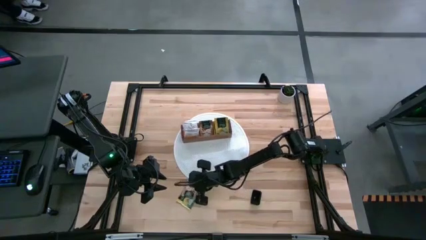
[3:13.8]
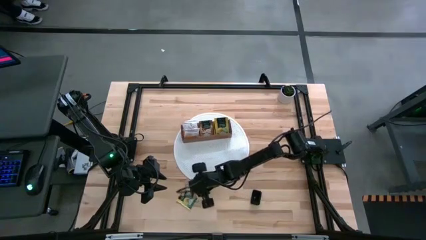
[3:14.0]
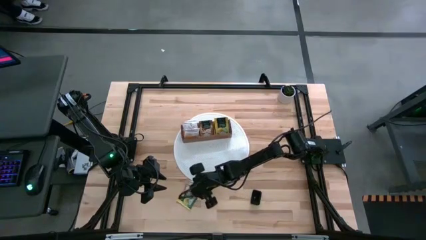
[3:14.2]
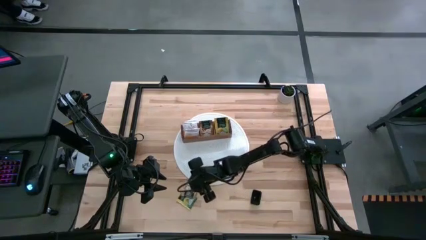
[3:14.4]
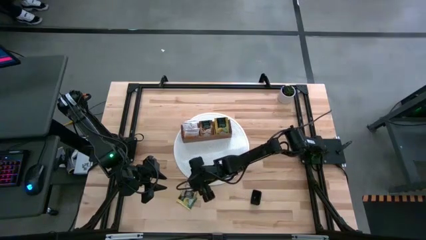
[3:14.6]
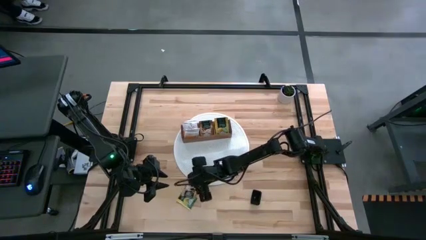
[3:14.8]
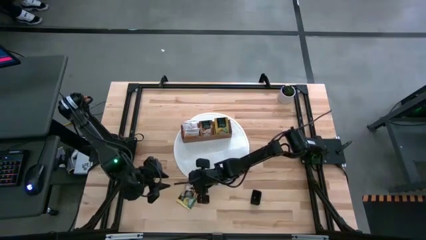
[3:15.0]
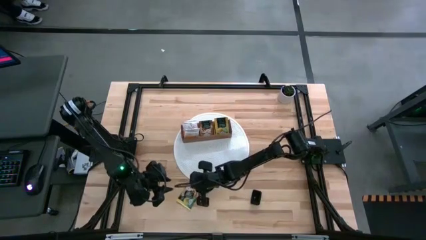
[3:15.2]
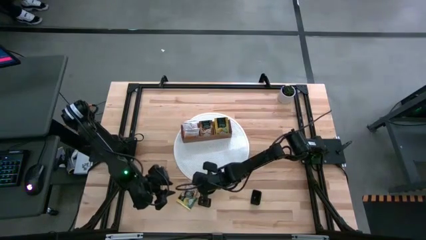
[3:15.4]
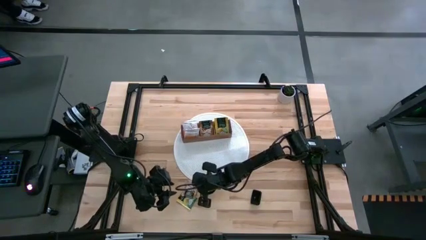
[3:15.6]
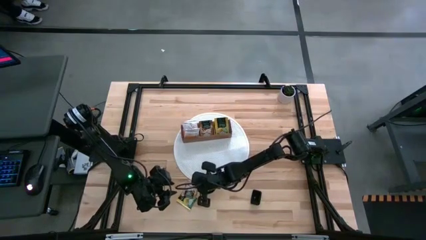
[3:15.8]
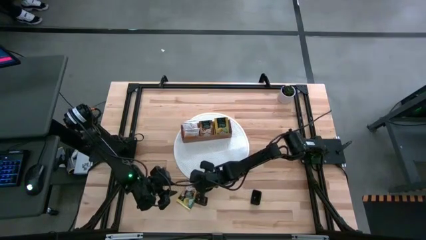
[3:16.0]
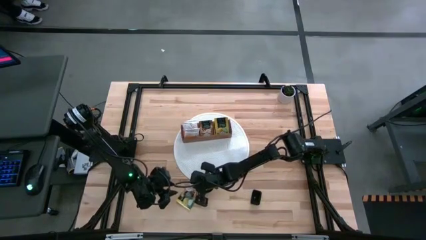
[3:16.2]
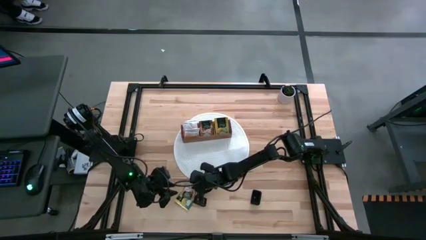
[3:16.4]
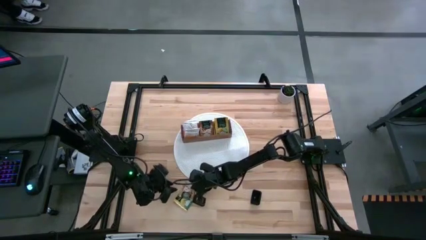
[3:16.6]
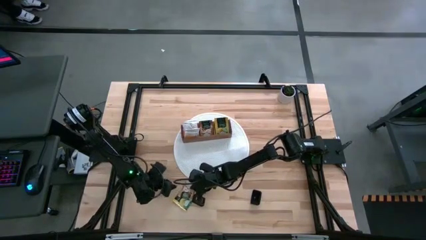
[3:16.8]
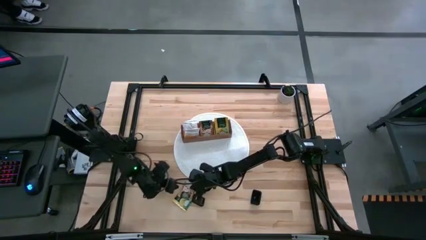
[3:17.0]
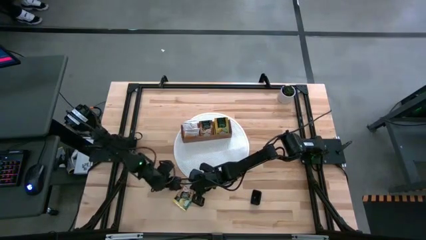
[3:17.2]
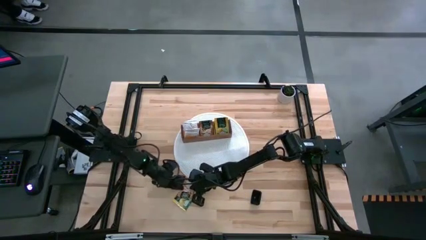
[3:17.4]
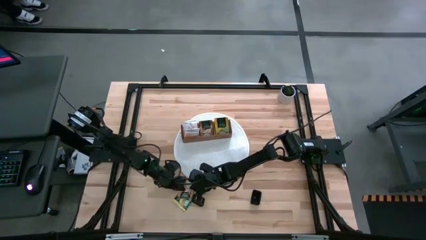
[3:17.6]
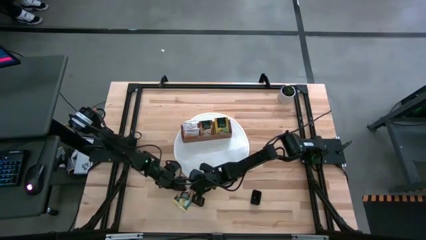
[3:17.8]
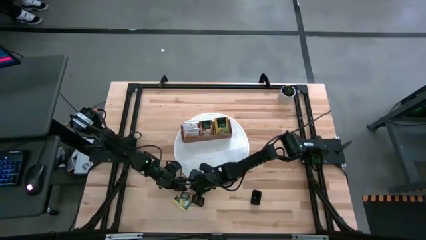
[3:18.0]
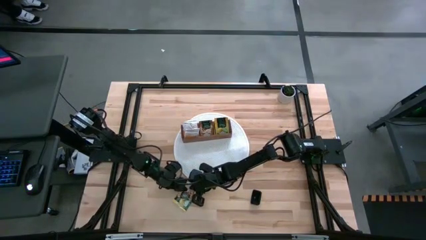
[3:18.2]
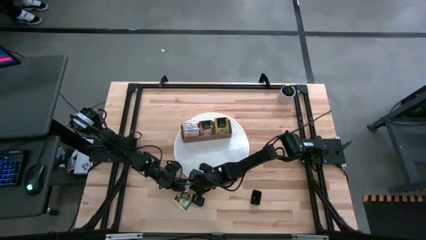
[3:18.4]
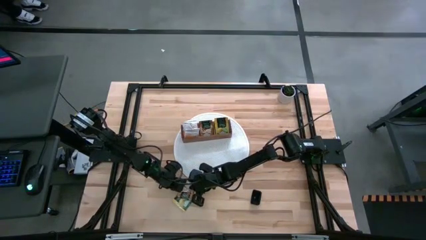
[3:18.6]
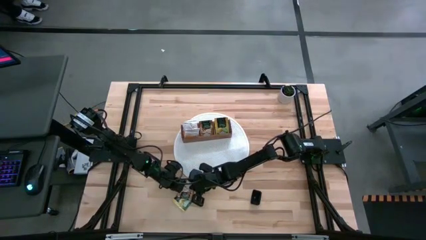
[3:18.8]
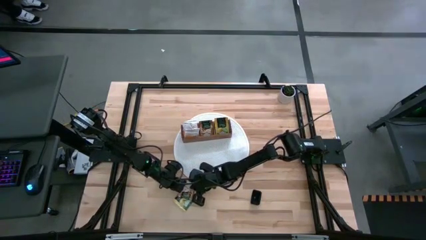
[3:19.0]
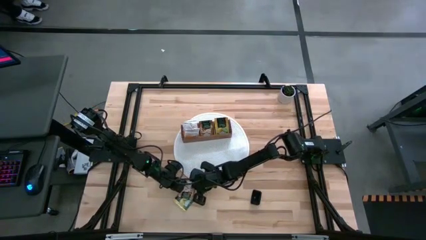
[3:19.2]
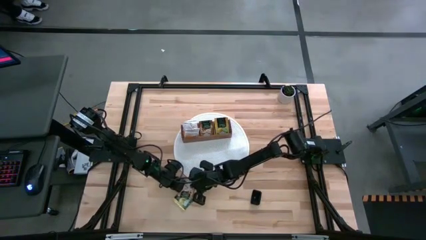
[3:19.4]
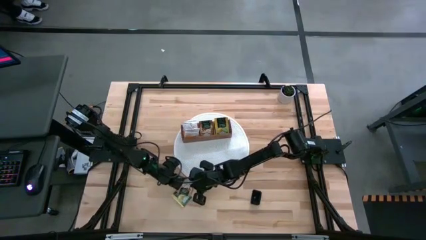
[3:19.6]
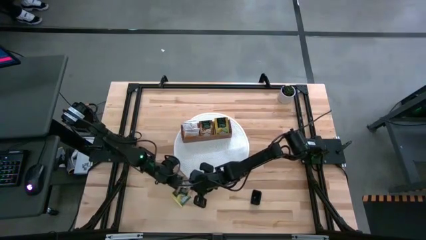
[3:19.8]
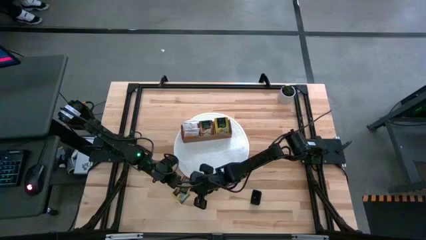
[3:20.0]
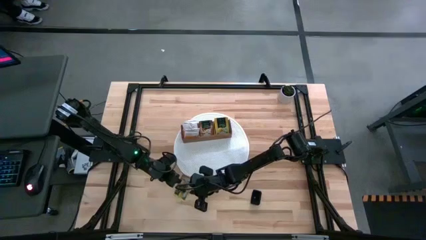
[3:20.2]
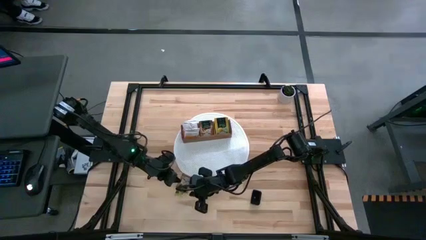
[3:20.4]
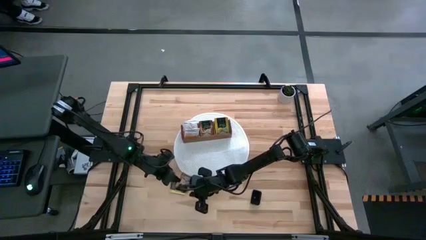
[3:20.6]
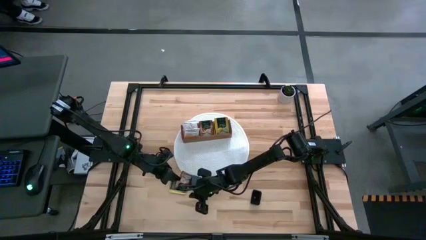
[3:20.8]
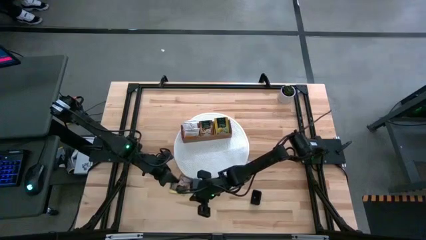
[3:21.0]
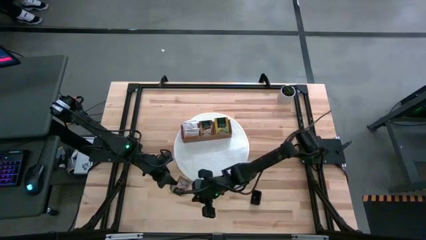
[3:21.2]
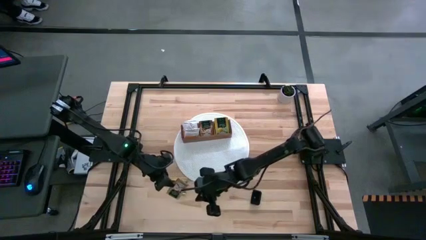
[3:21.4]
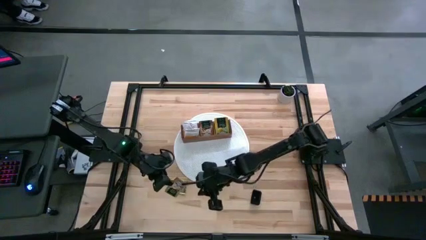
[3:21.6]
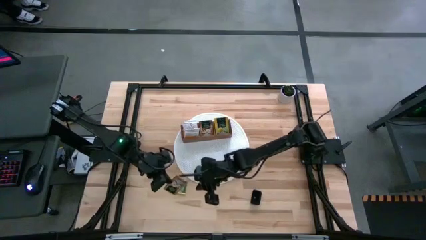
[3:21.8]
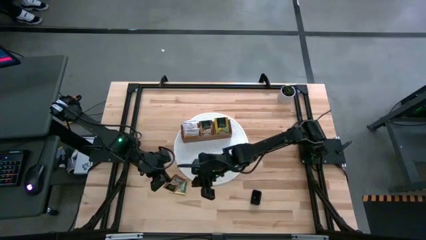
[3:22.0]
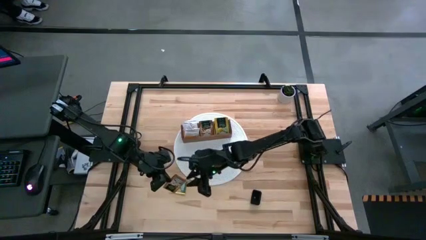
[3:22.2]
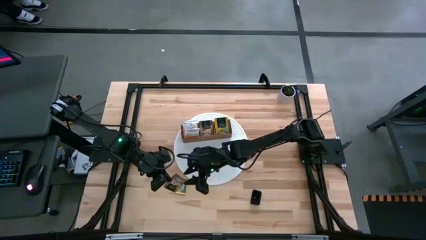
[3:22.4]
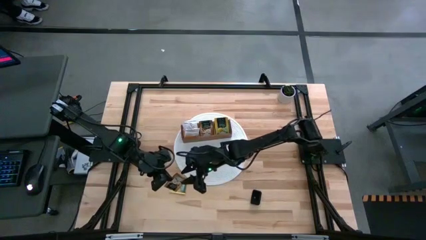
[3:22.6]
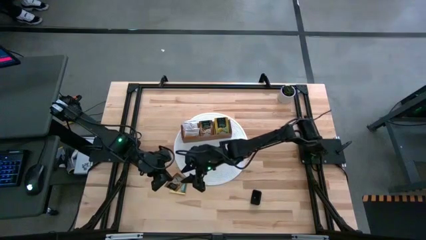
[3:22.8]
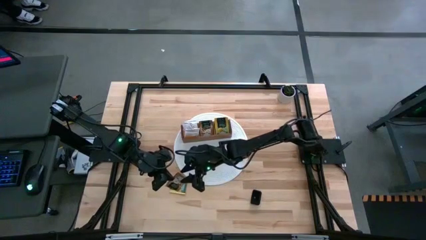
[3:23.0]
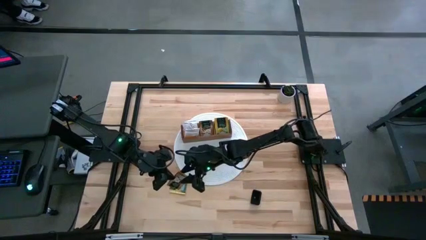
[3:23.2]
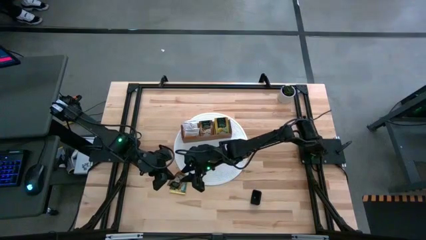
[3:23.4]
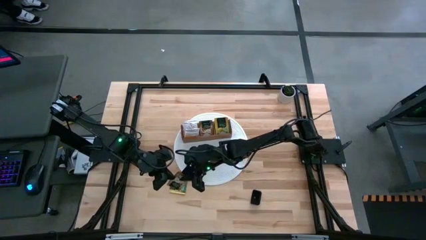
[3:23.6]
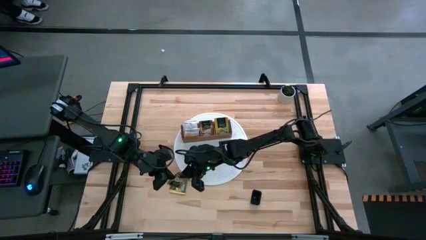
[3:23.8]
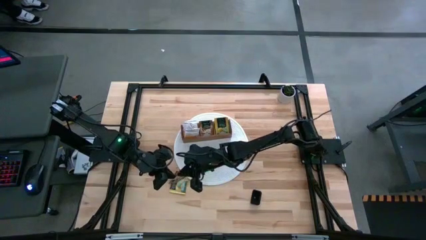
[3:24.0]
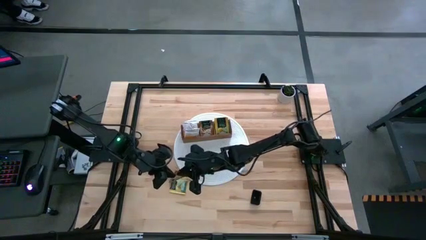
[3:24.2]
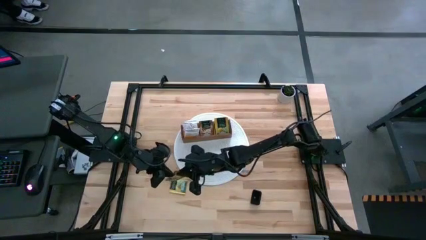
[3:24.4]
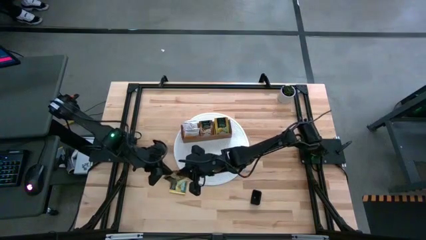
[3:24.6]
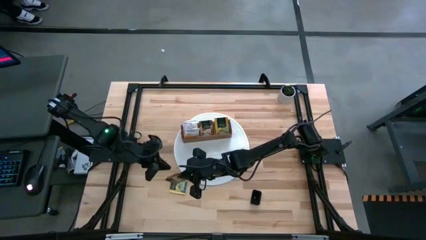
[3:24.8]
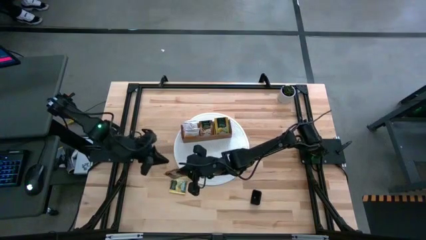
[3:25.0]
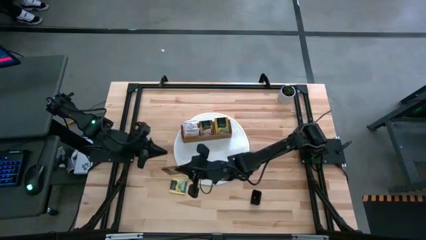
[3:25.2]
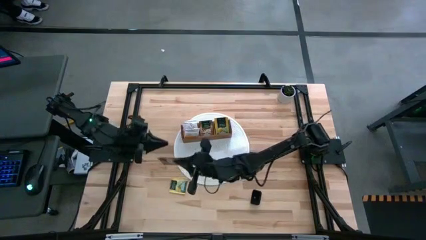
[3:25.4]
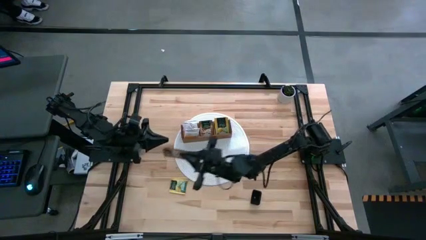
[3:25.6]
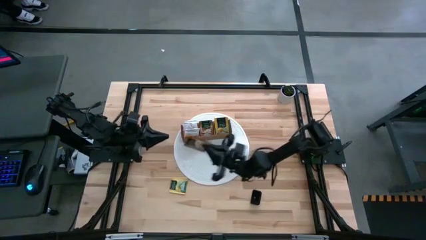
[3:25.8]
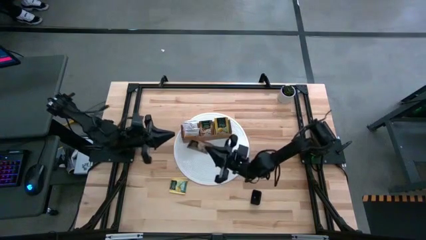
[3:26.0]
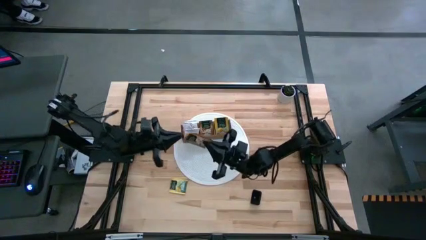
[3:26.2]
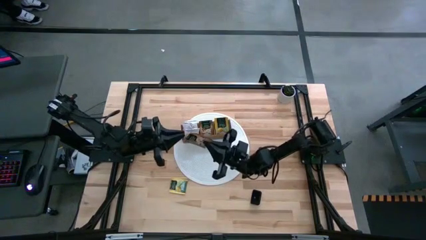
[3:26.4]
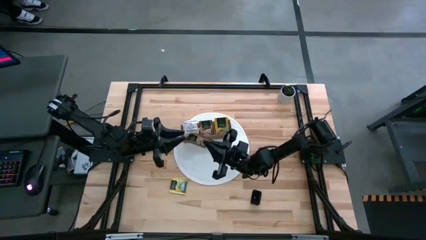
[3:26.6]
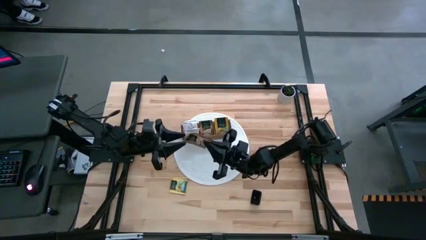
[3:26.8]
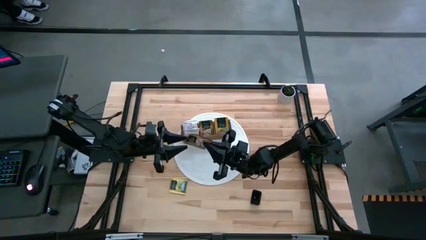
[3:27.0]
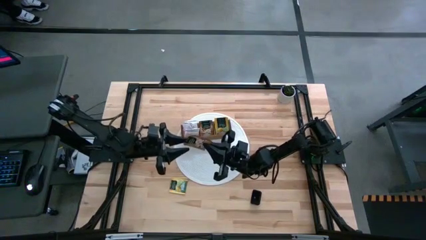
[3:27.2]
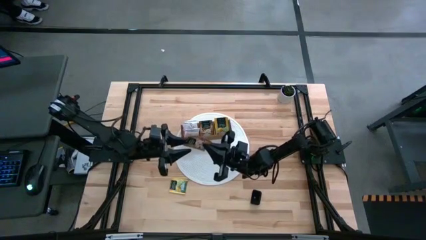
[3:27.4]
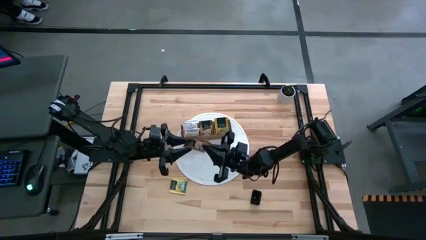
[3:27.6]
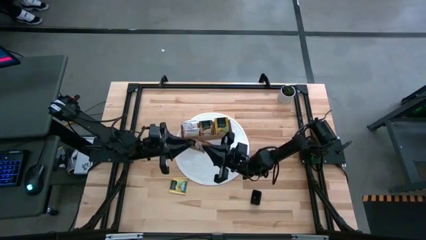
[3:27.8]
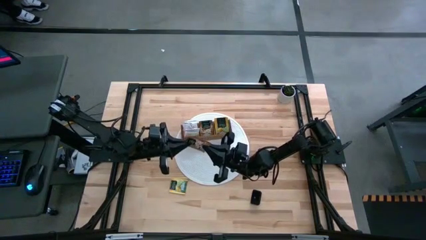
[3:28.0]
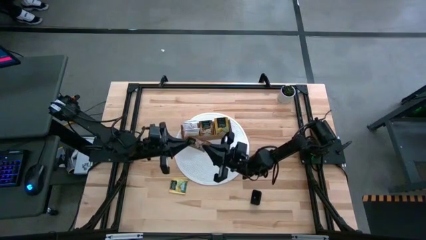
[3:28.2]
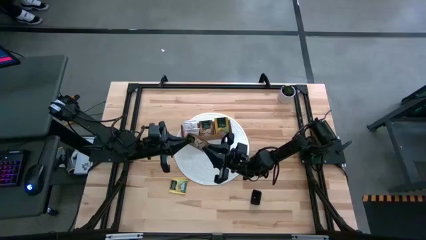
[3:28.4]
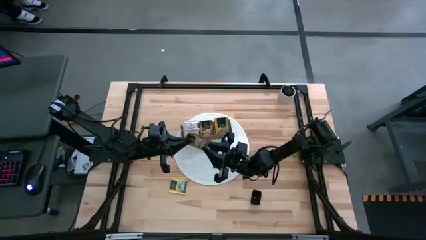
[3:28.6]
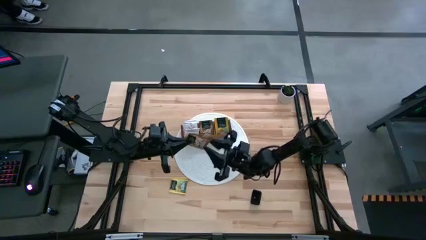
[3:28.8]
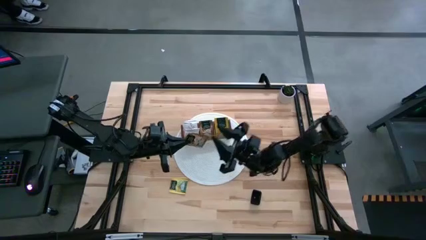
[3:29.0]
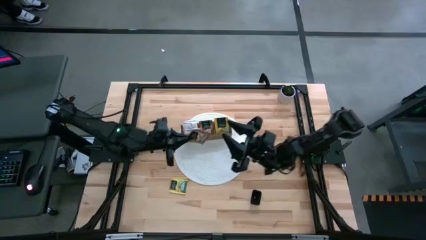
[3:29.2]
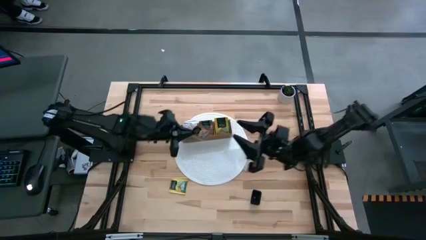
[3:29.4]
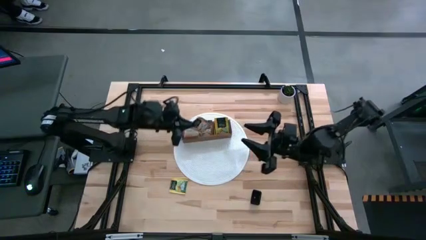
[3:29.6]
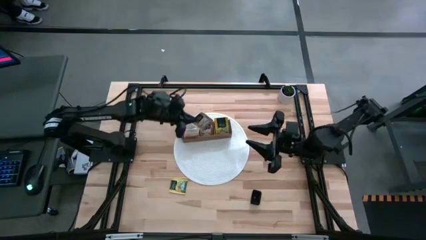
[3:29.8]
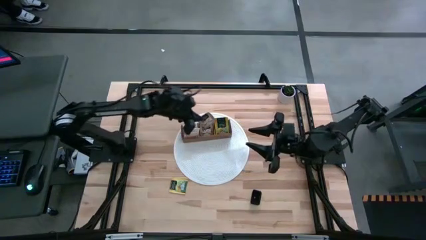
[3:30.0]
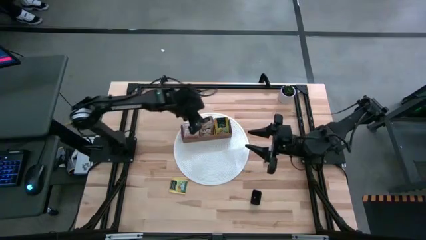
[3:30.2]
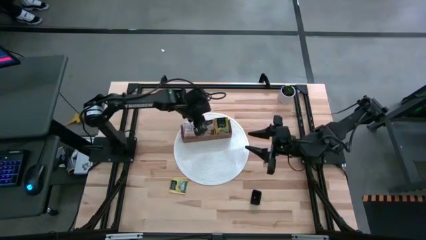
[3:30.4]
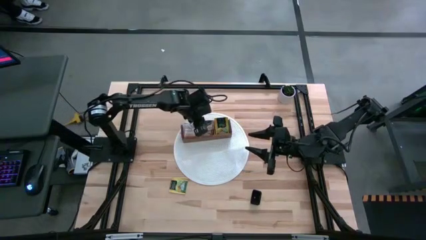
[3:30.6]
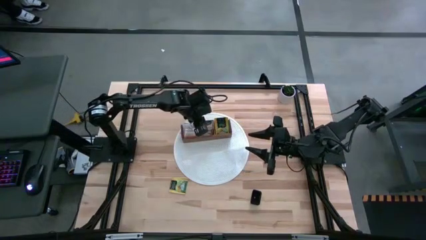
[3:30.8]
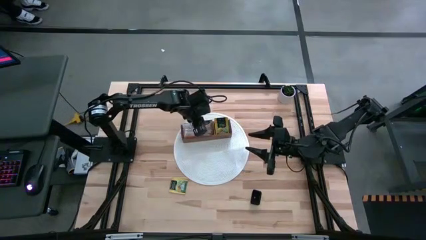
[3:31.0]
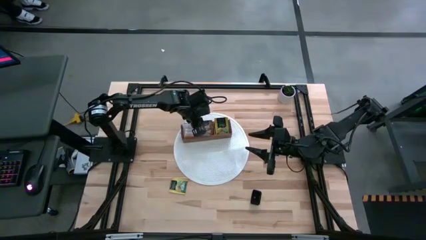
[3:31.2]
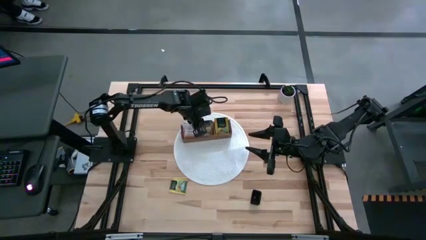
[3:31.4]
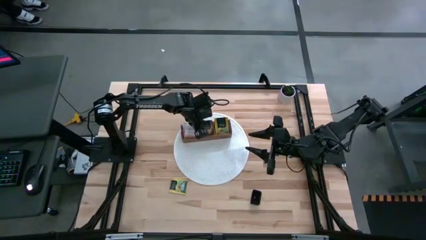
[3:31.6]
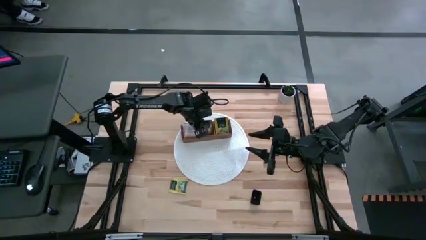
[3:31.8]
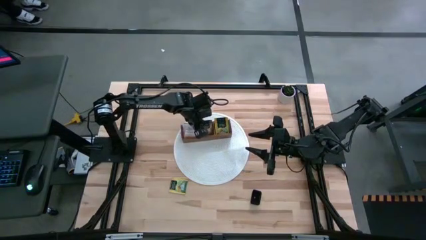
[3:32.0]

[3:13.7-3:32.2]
Task: Pick & Place Tea
Put the brown tea bag into the middle section of the wooden organizer
